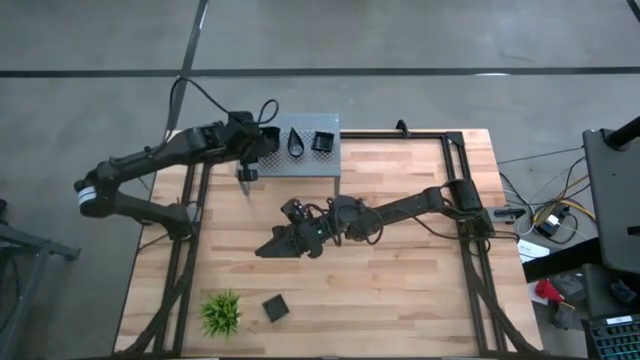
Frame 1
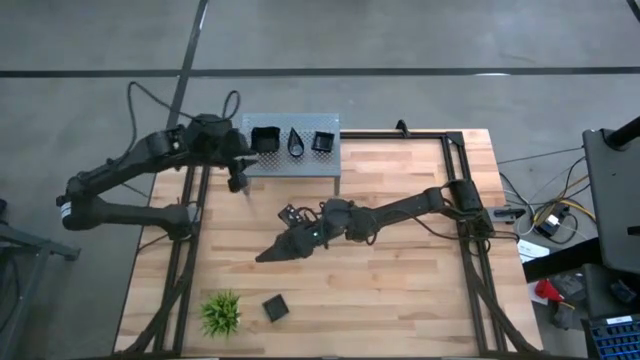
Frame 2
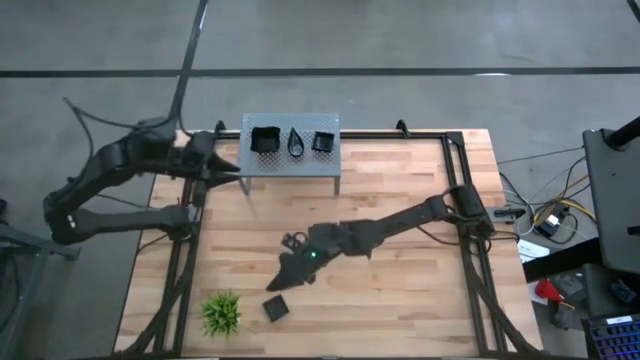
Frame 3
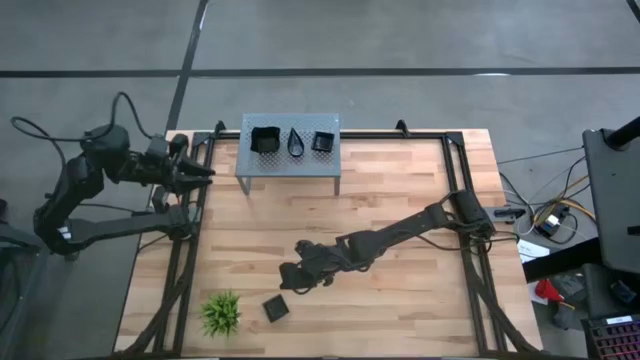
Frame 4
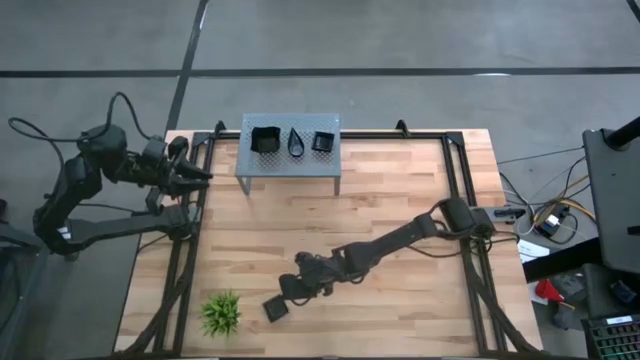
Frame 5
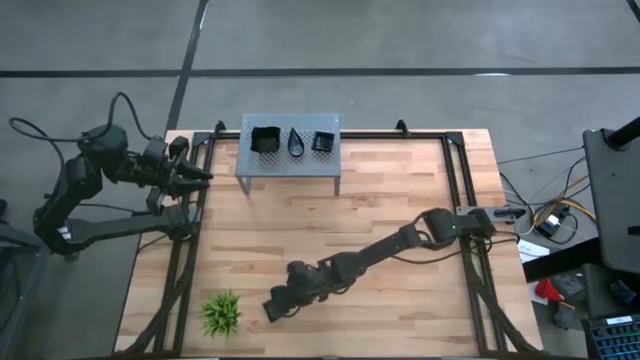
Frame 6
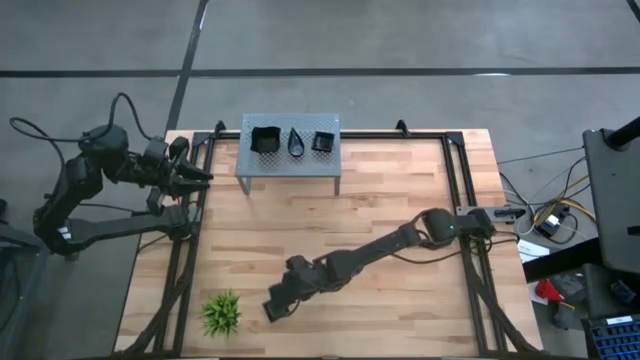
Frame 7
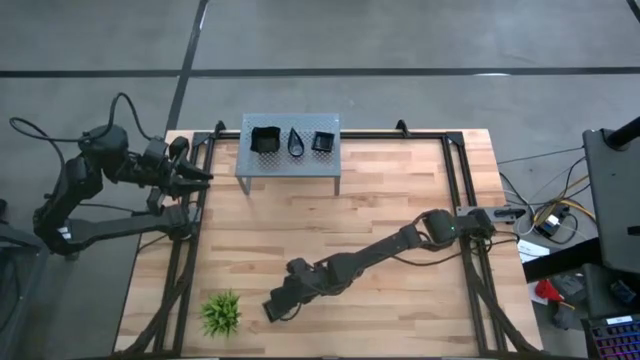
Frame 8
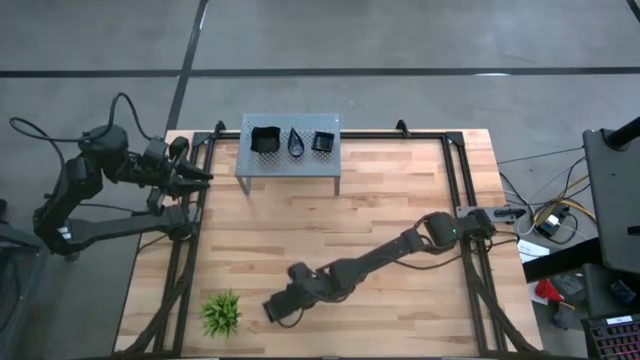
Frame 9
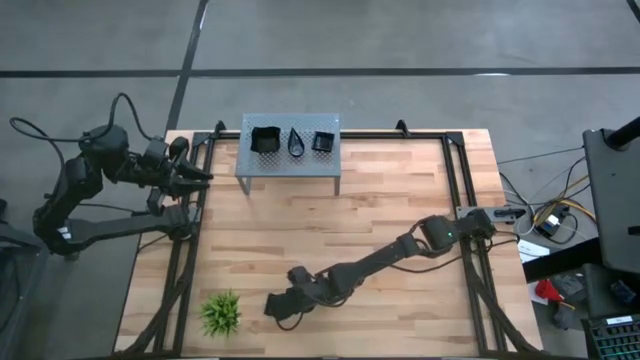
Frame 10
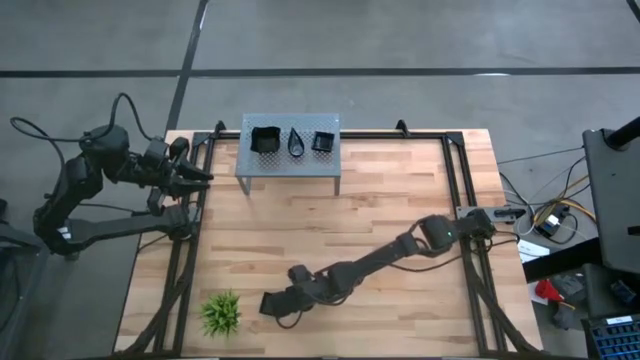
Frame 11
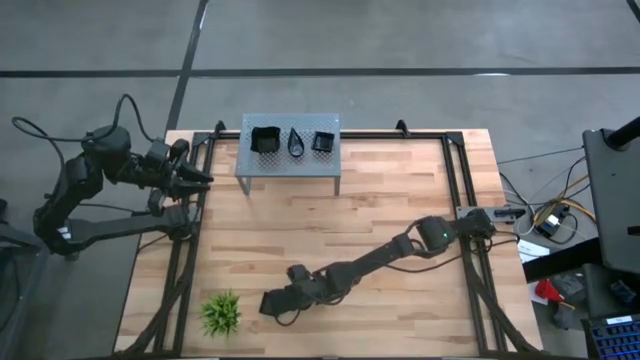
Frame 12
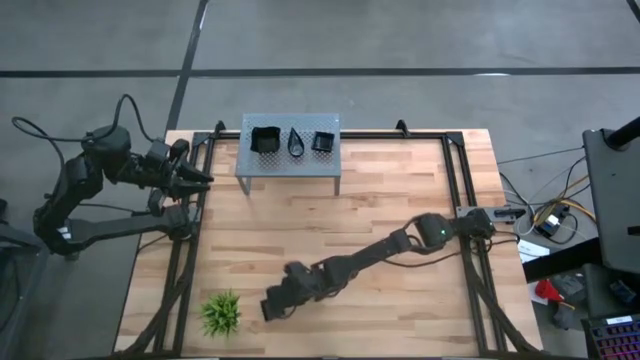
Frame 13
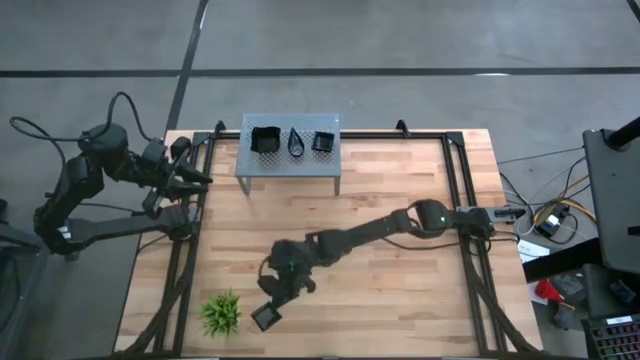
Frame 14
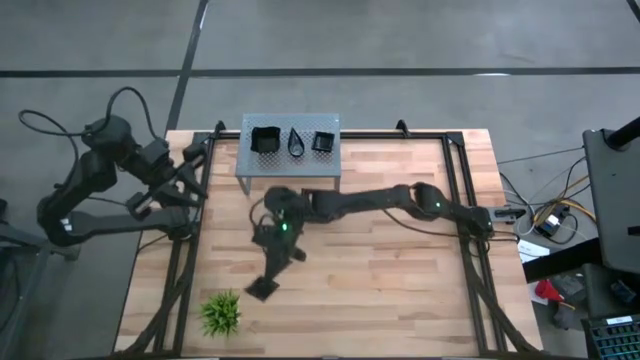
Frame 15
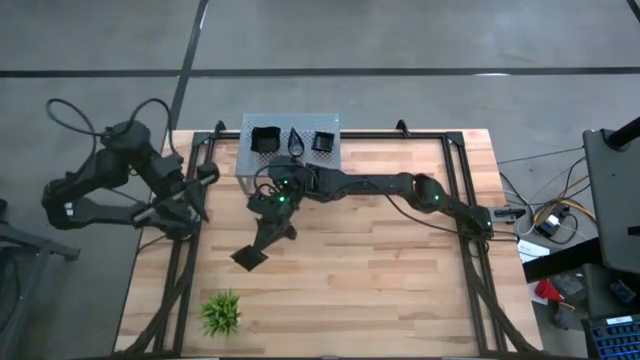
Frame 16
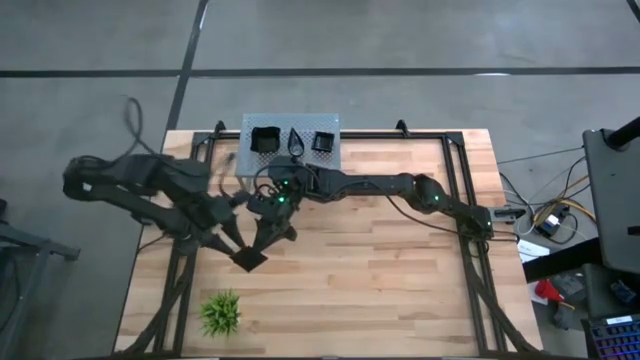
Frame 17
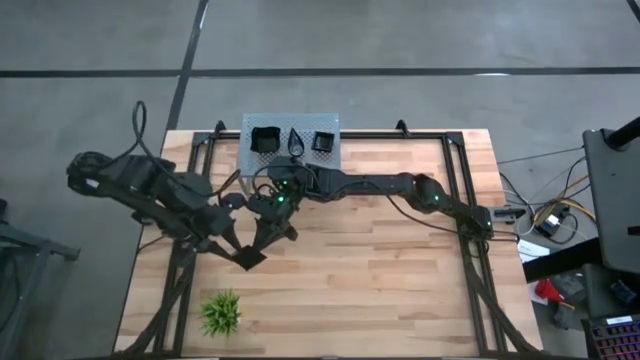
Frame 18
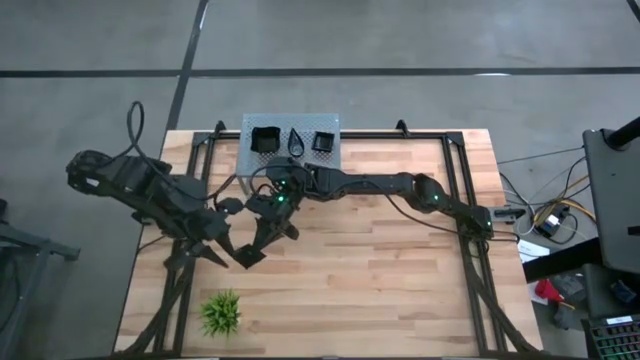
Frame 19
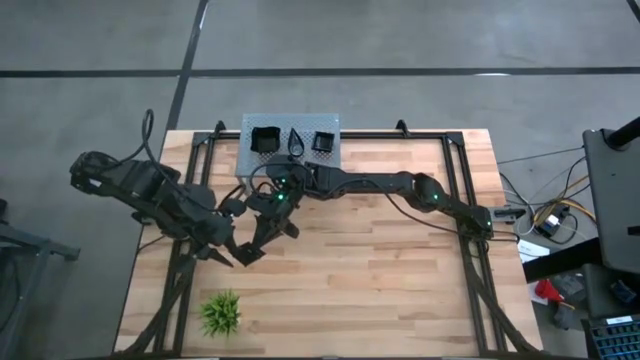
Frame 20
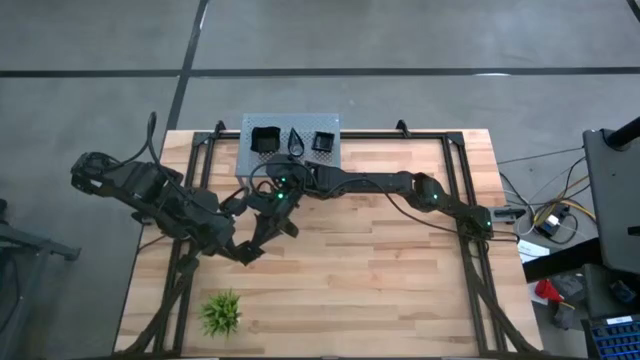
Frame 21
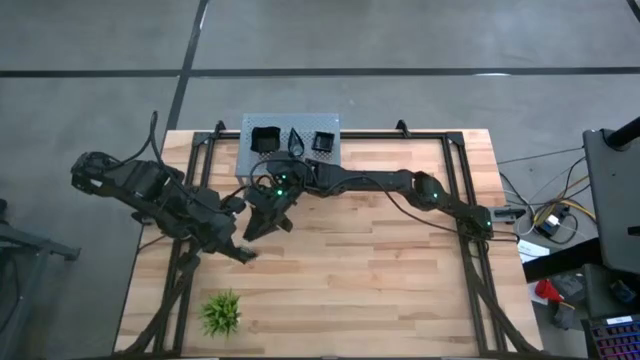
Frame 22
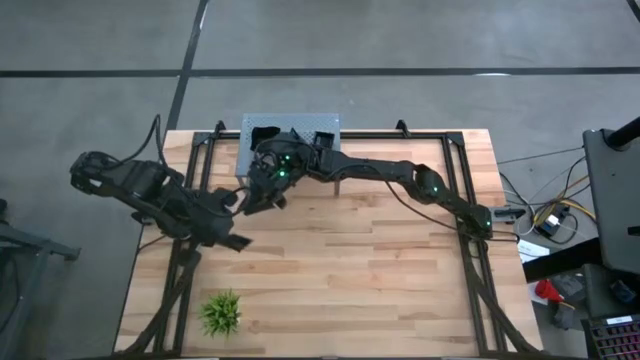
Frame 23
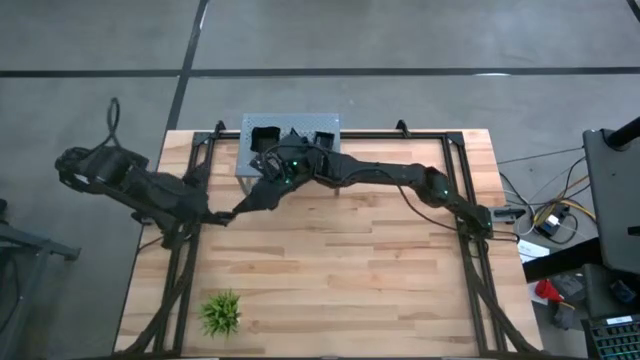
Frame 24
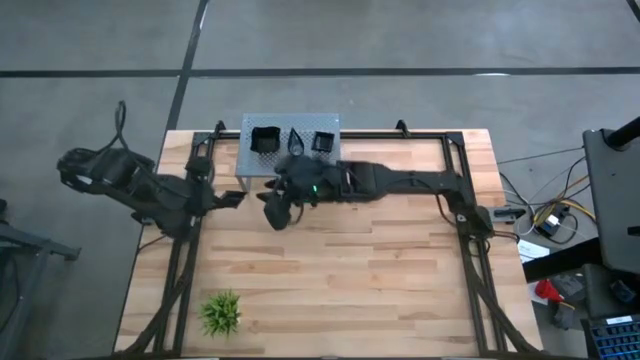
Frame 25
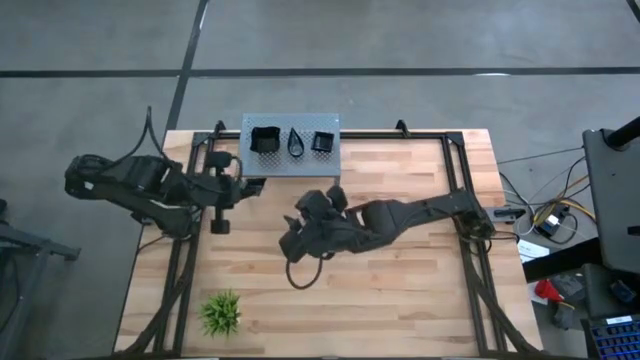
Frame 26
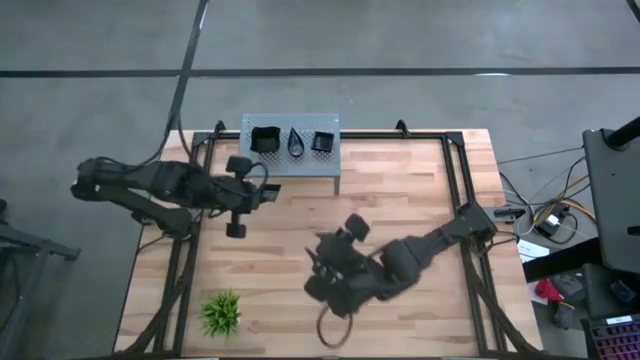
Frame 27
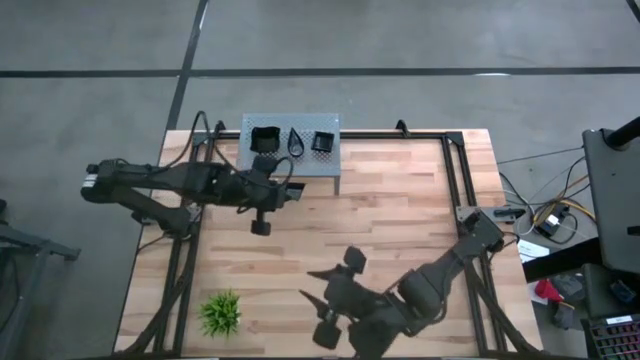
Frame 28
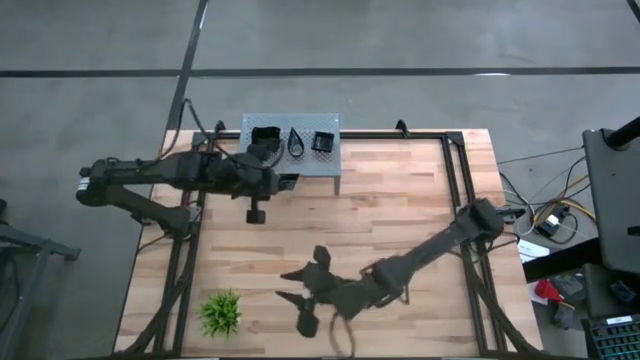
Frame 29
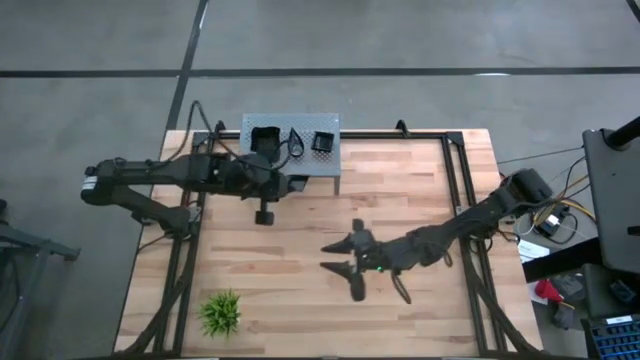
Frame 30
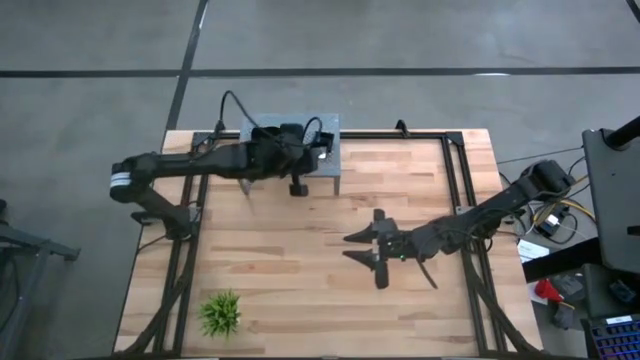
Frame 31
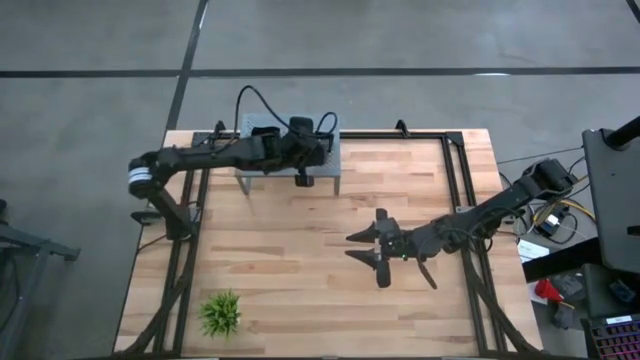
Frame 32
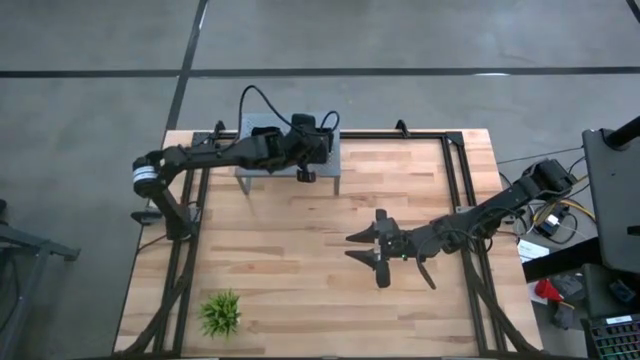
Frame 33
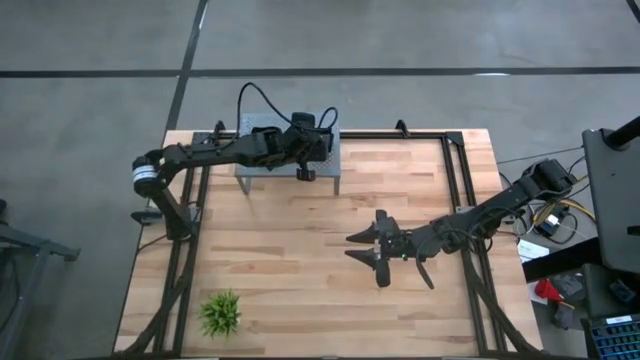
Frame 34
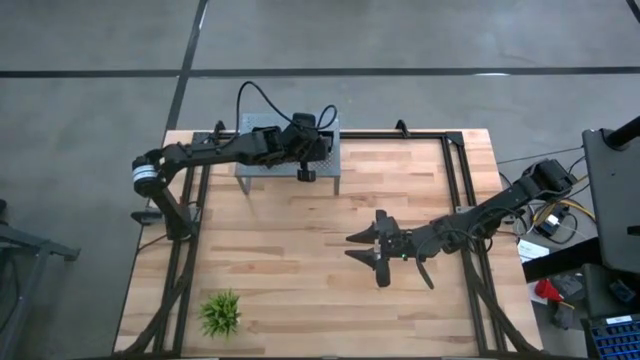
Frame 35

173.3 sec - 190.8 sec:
Task: Pick & Place Mini shaped plates
Stack the square plate on top of the other square plates on the shelf

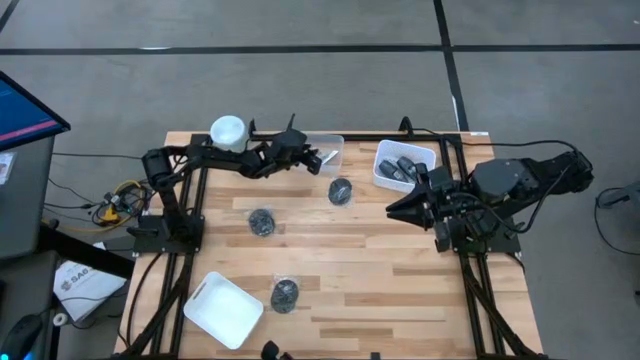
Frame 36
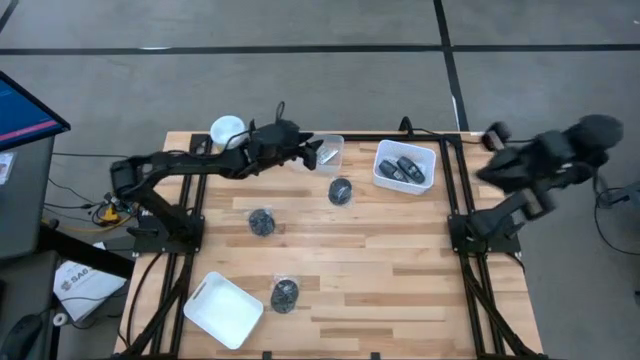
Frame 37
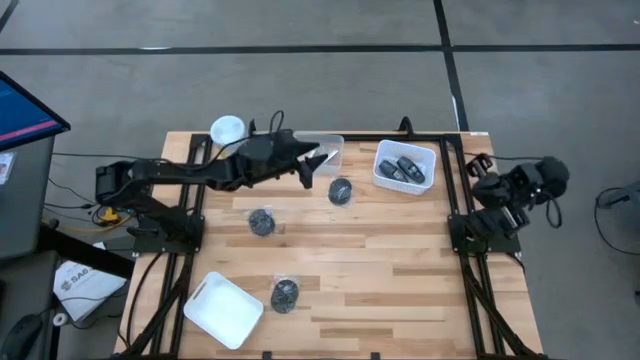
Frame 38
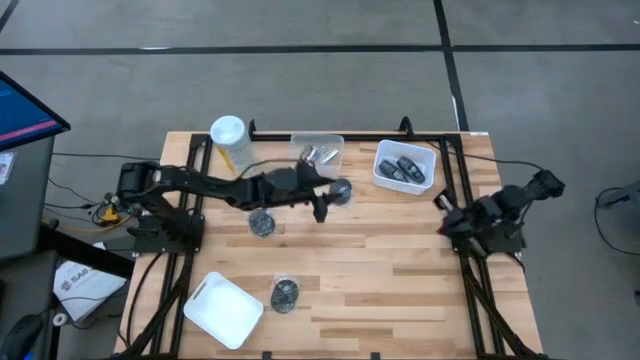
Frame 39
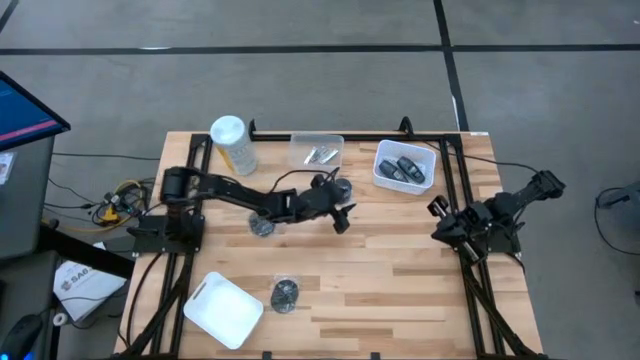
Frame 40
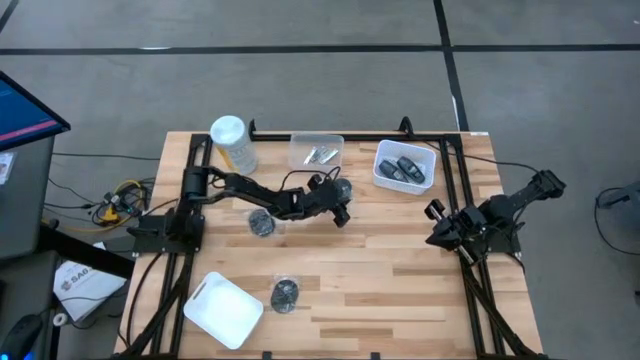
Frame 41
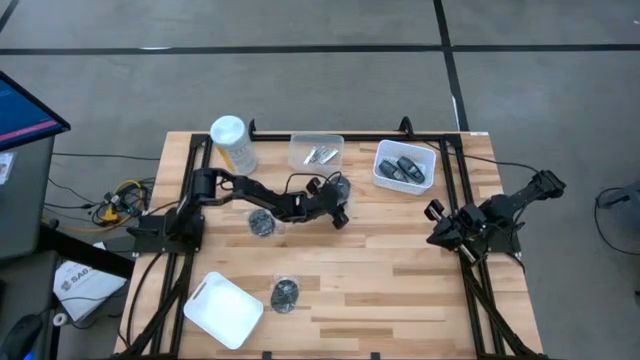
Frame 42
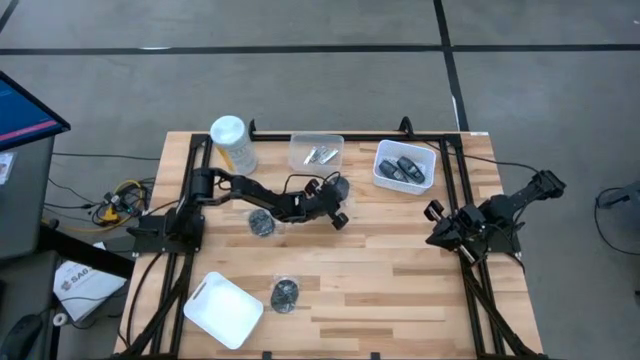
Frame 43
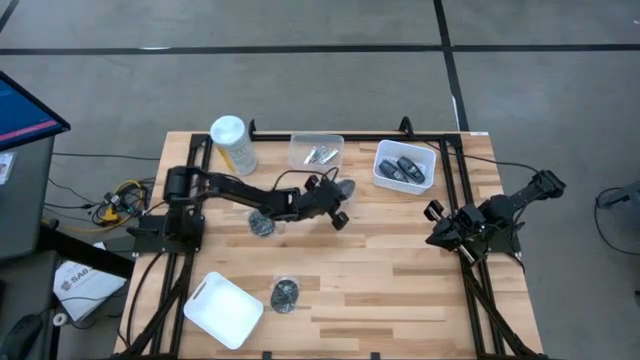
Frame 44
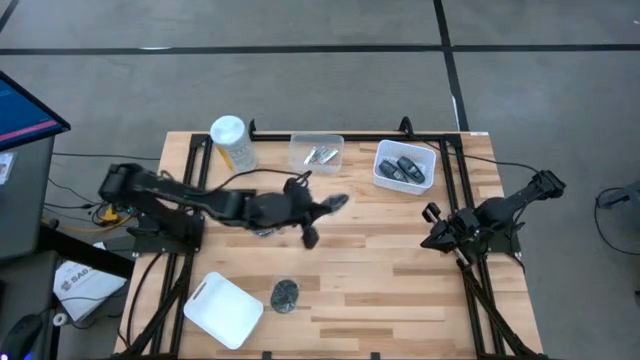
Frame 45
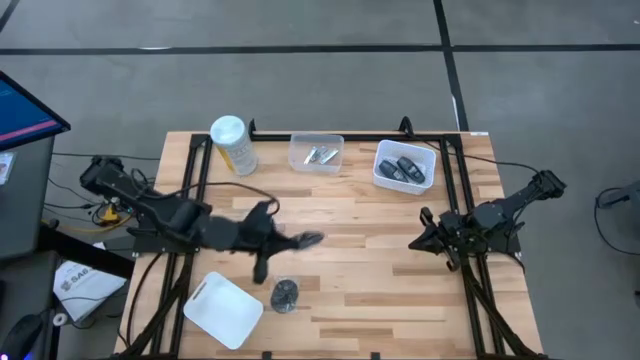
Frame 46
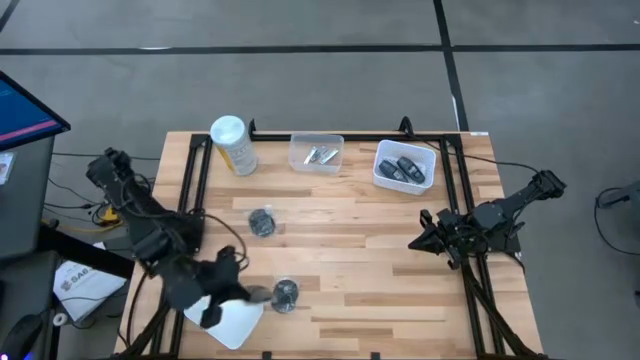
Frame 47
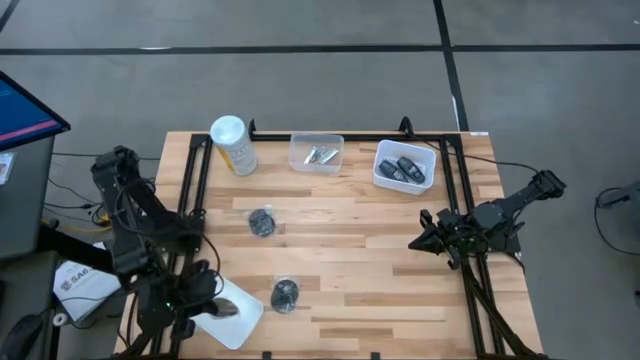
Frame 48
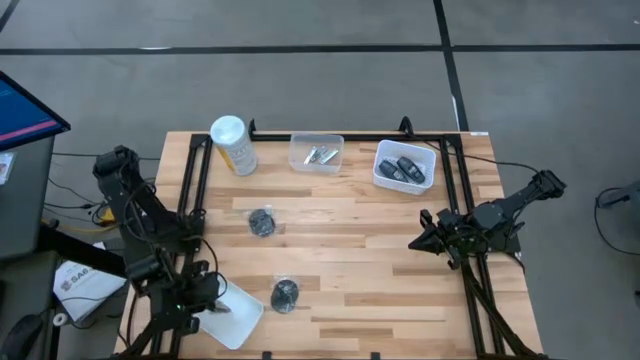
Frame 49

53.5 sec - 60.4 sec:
Task: Pick & Place Travel size toiletries
Put the black hairbrush into the white bin
